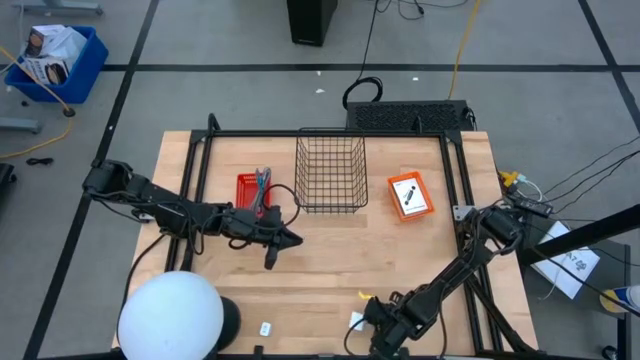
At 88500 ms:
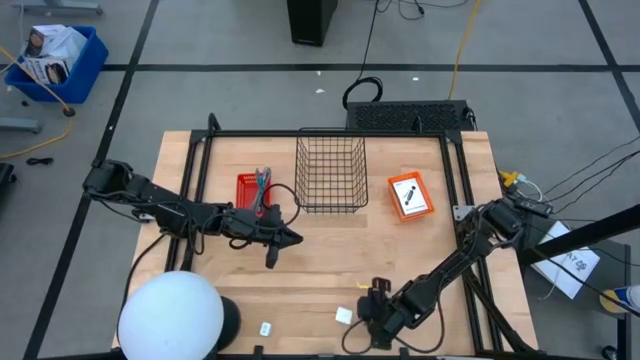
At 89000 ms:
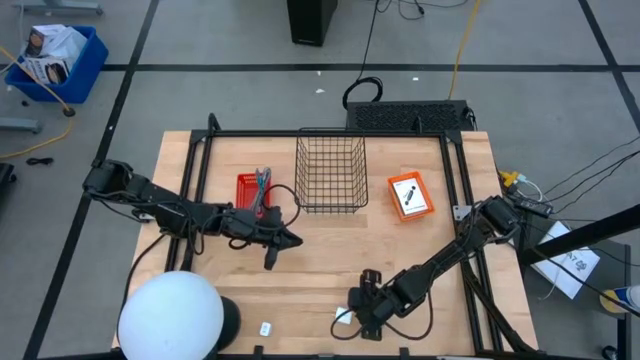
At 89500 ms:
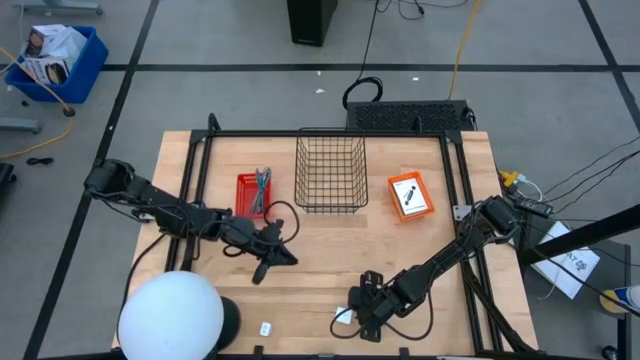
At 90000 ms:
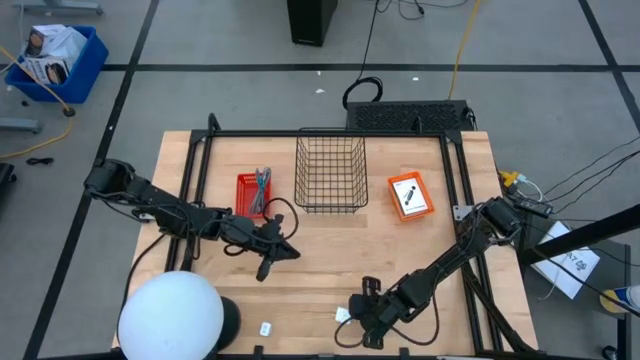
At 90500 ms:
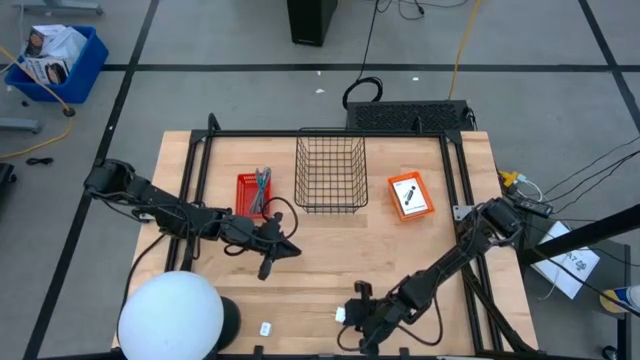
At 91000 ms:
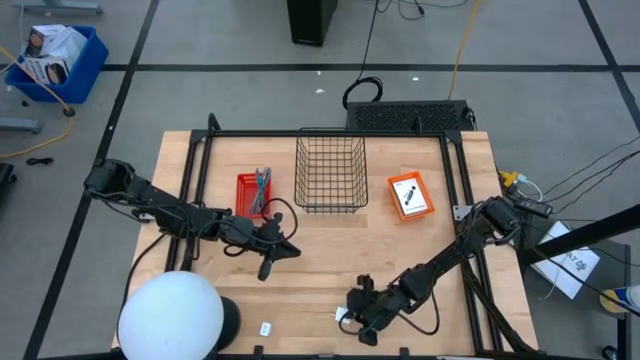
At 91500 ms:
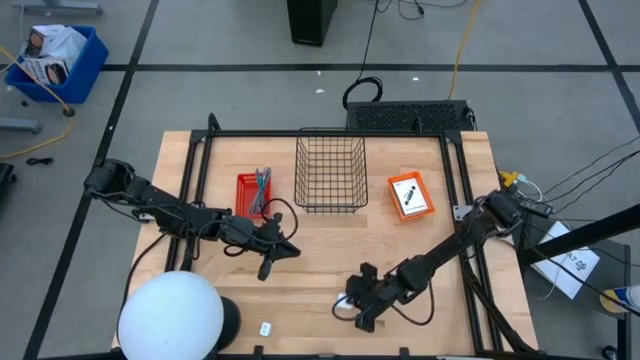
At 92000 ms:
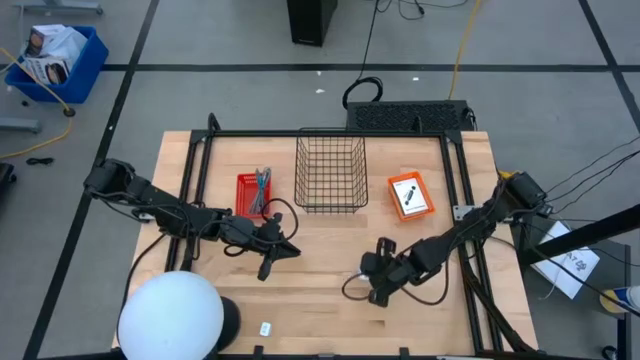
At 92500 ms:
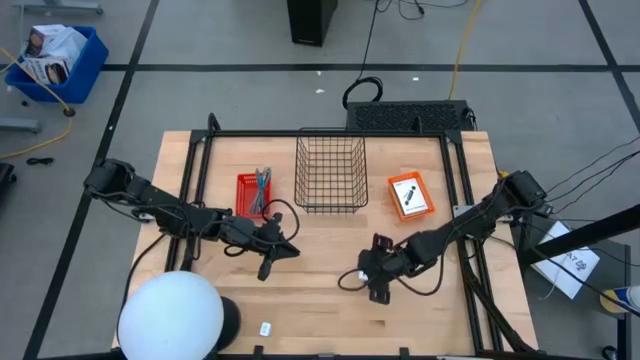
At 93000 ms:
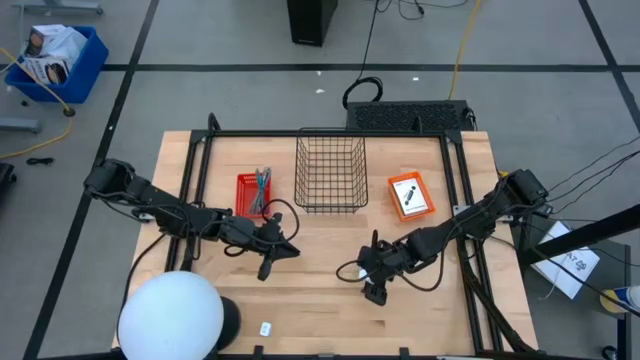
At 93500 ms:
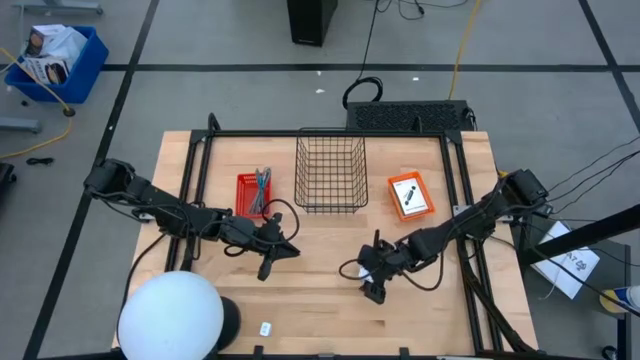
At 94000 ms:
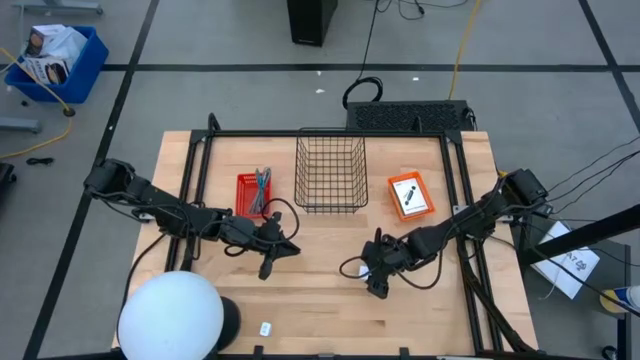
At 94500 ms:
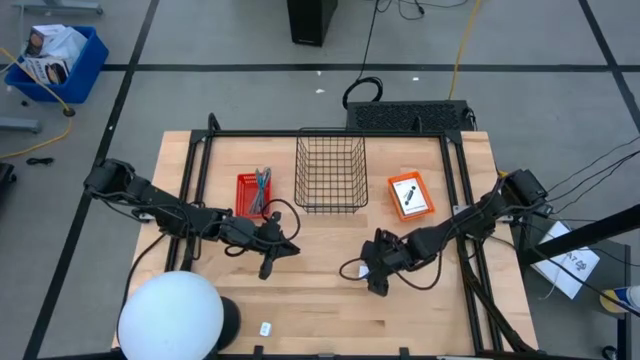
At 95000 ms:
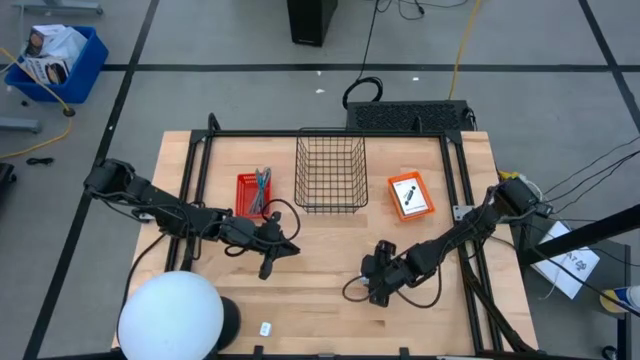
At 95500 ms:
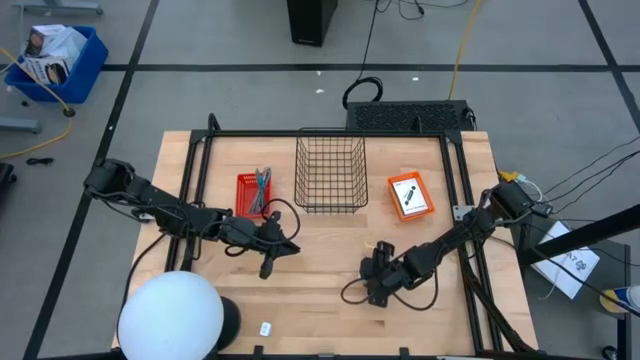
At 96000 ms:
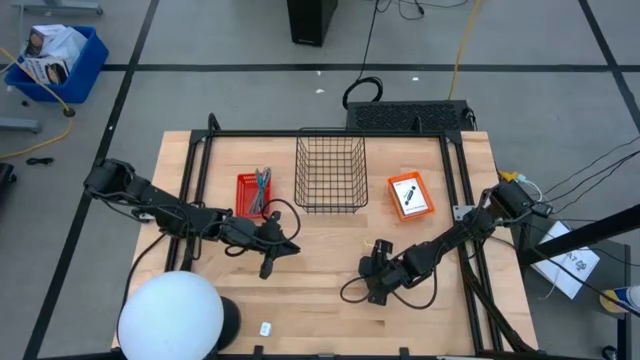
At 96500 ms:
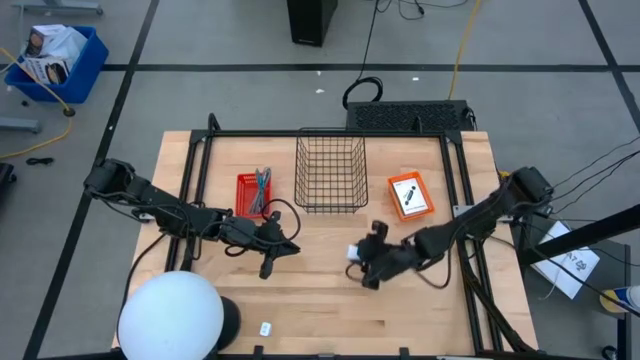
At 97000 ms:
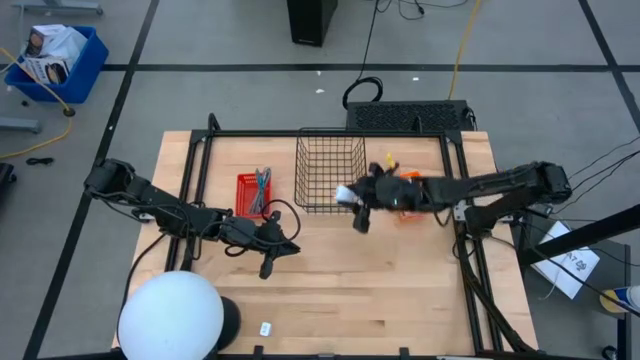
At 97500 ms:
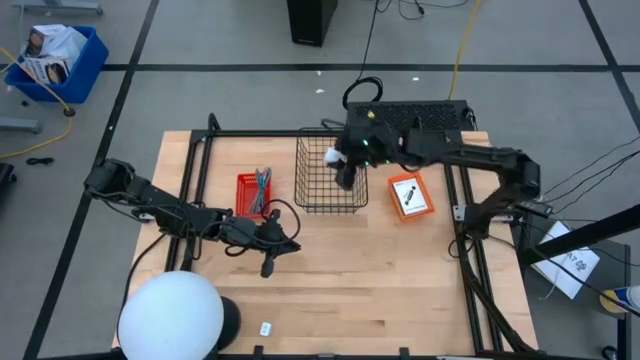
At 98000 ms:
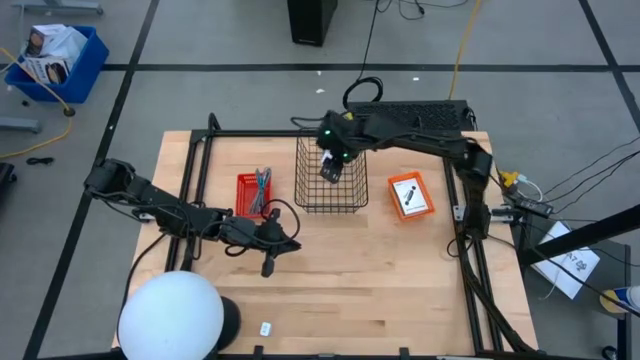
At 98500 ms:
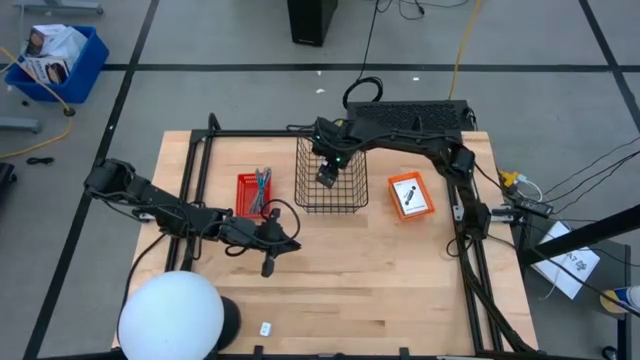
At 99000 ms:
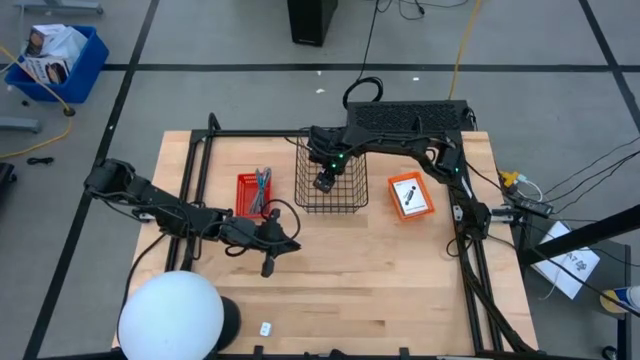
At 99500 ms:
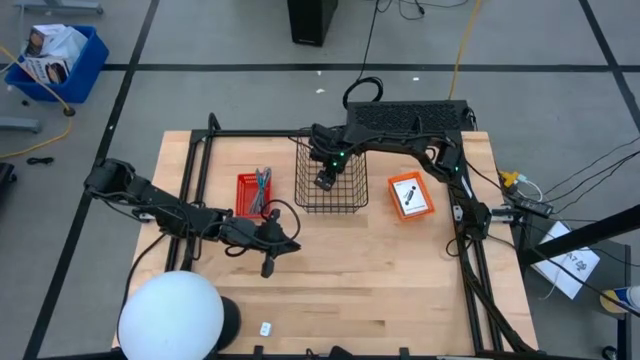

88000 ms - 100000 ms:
Task: Pick and place items into bin
Put the right white charger adapter into the wire basket

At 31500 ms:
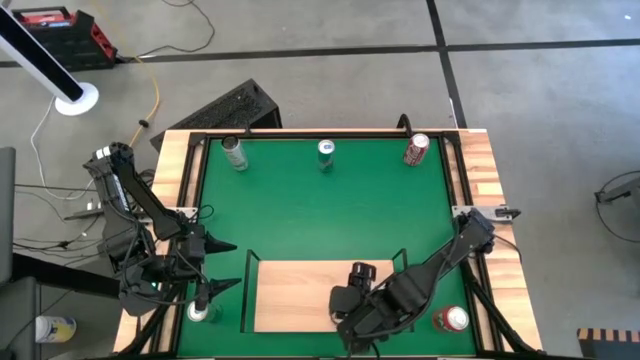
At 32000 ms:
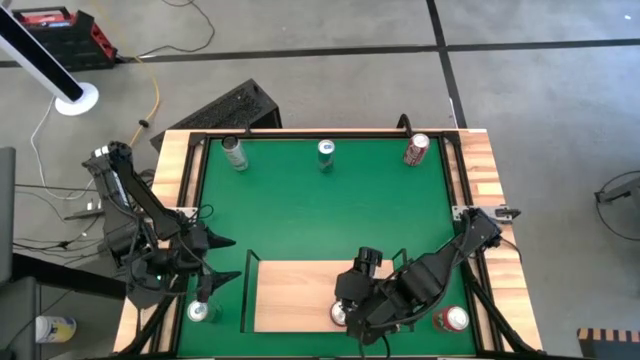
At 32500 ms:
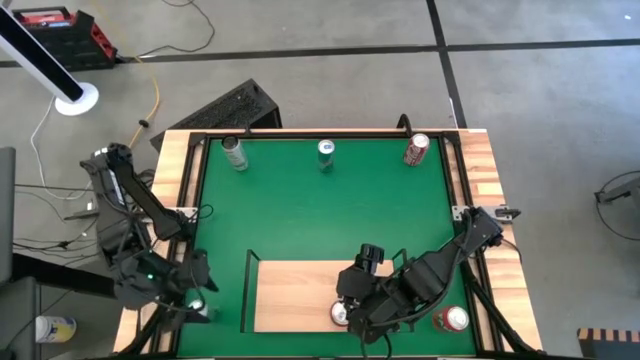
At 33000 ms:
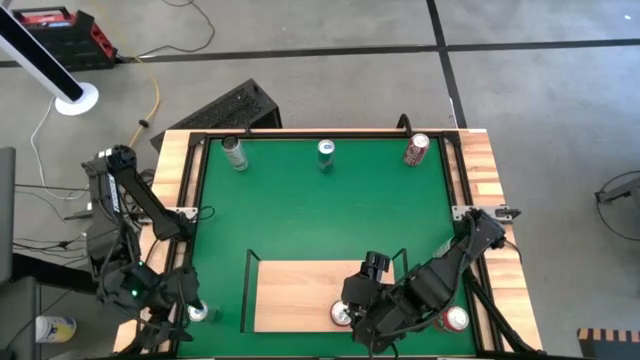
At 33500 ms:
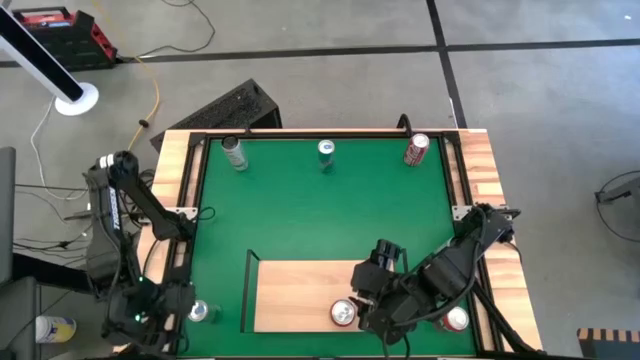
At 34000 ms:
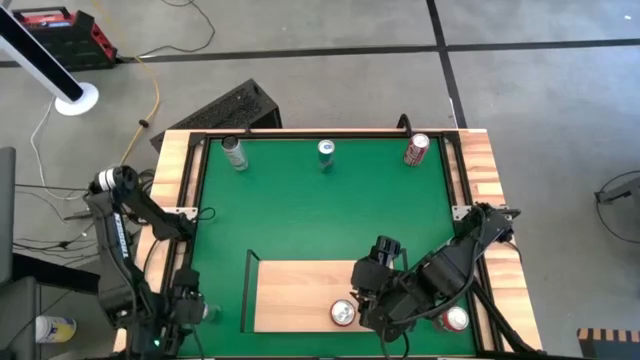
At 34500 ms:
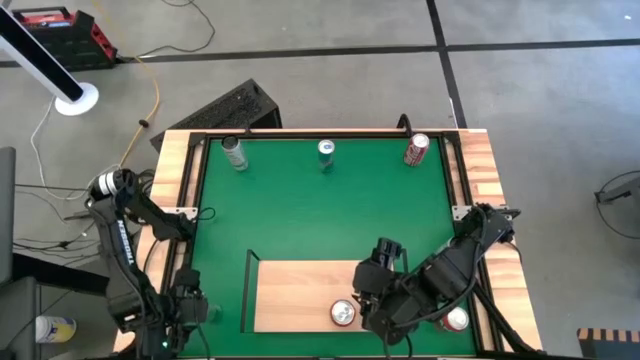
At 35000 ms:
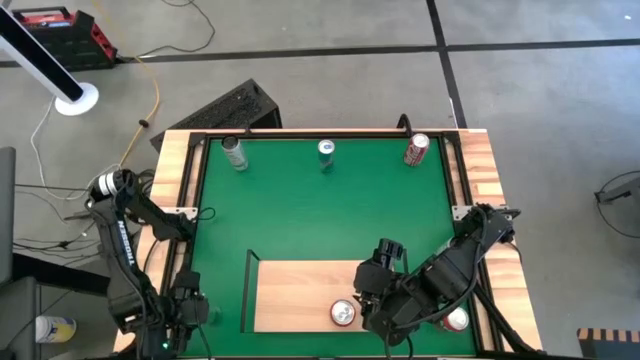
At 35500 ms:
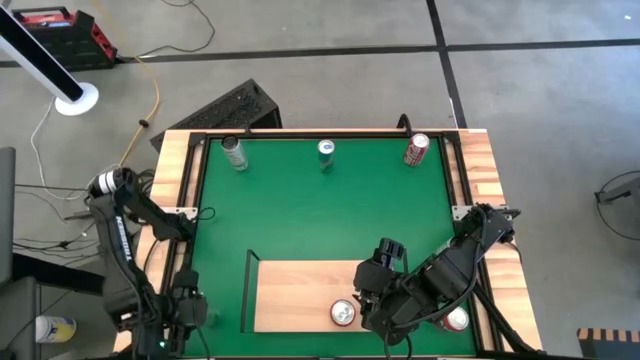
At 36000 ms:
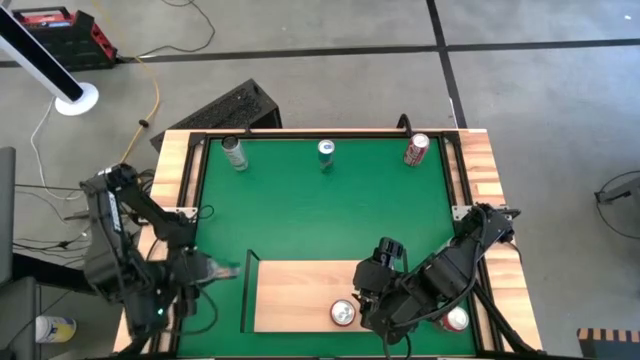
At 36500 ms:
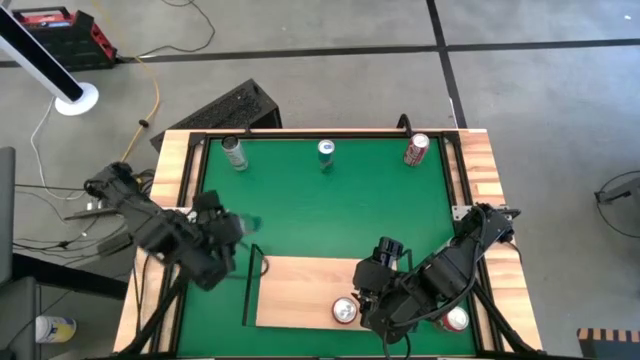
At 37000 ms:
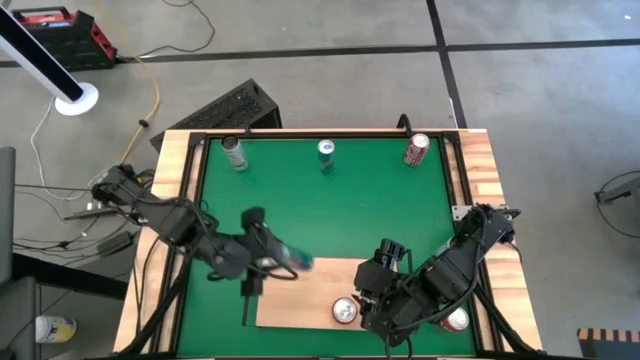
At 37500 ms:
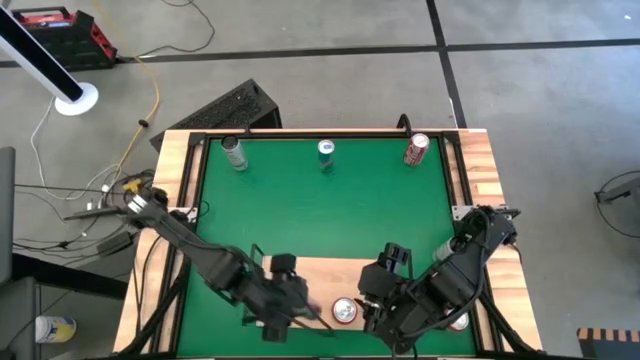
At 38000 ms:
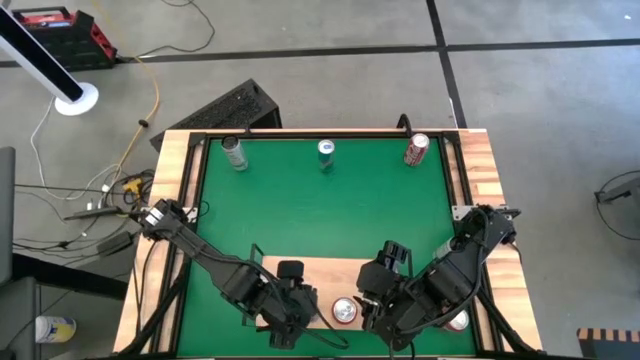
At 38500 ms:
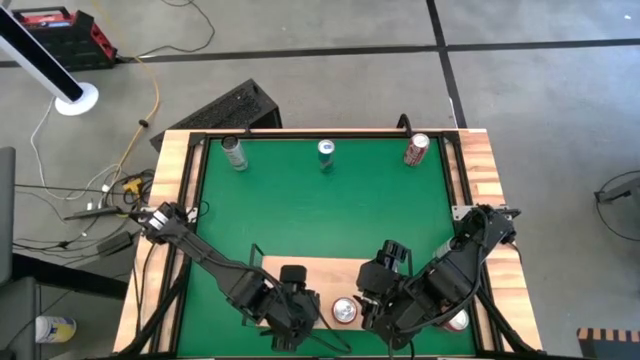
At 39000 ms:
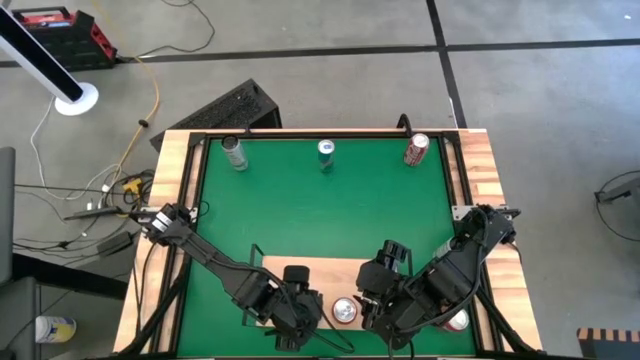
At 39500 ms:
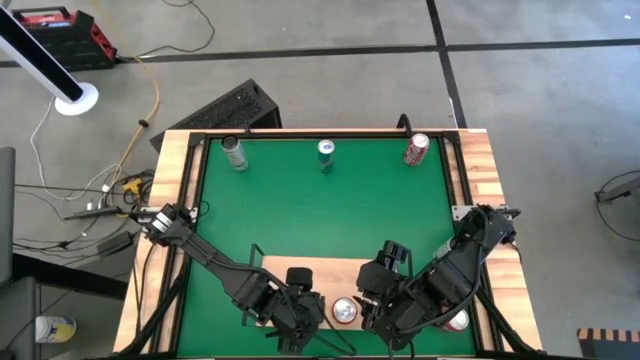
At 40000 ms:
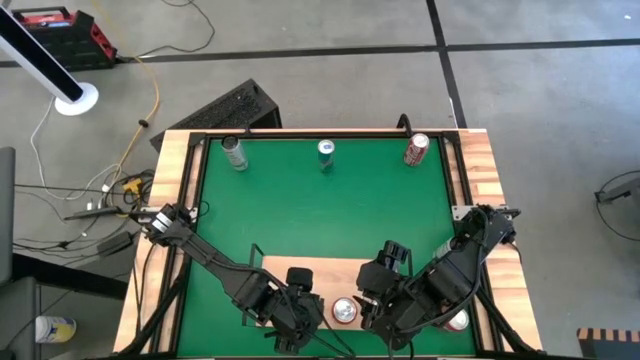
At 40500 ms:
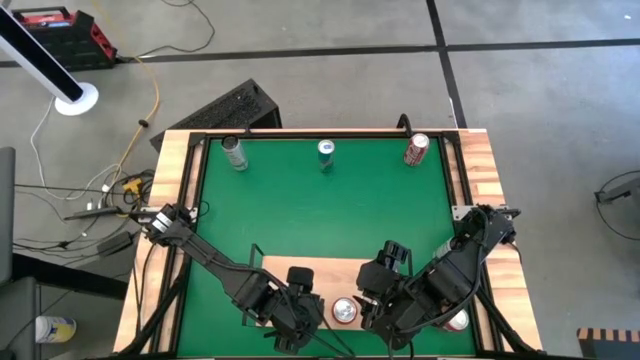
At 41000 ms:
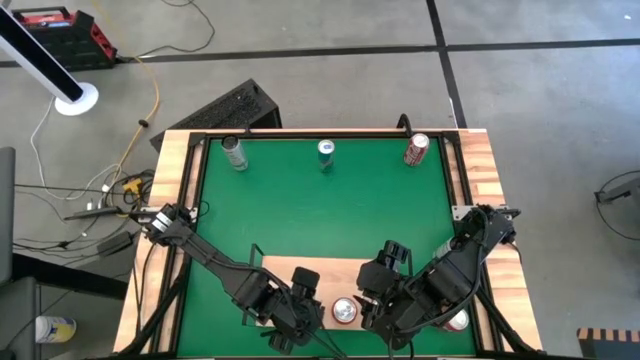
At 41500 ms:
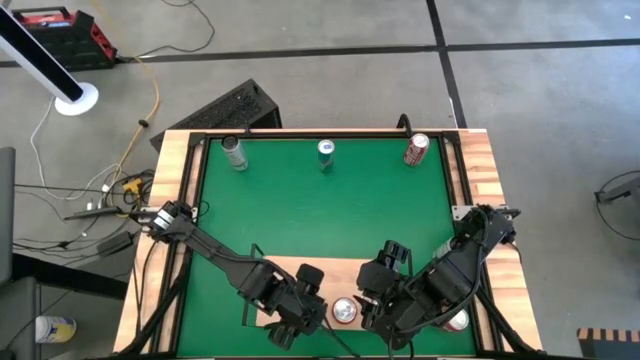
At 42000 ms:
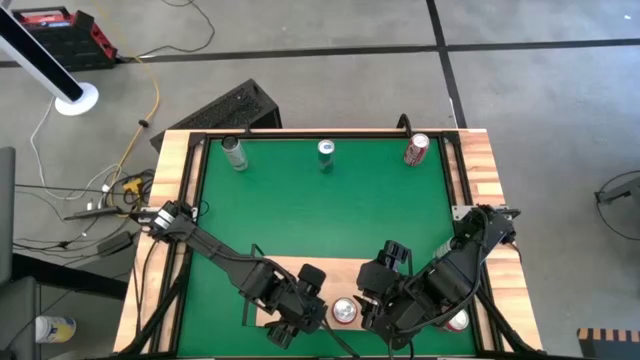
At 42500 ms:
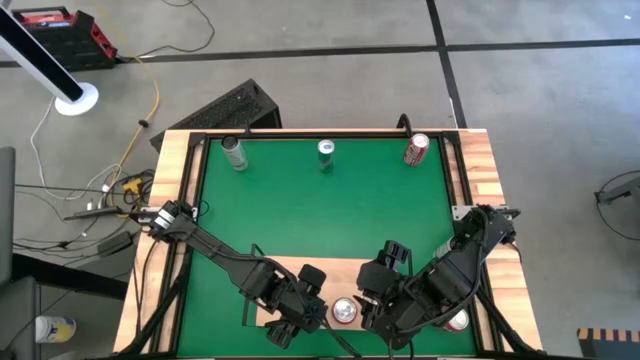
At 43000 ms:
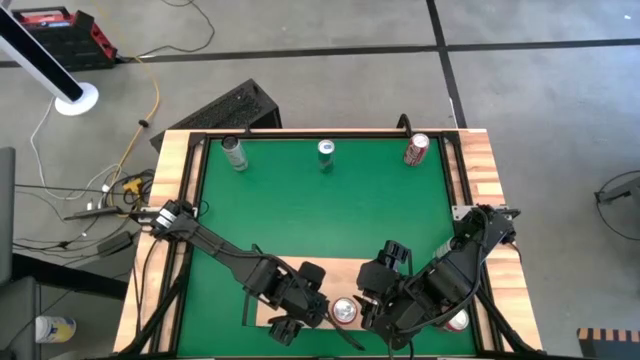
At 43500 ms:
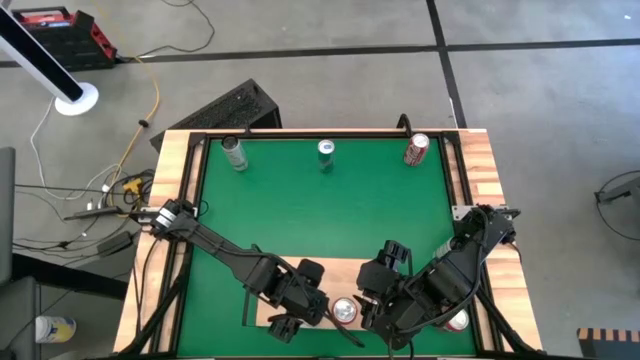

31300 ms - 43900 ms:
Task: Place canned beverage on shelf
Put the bottom blue soda can on the shelf
